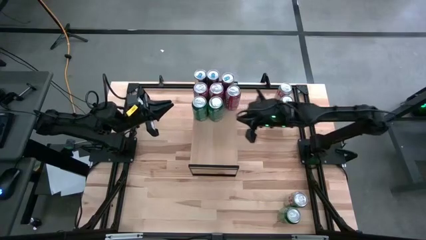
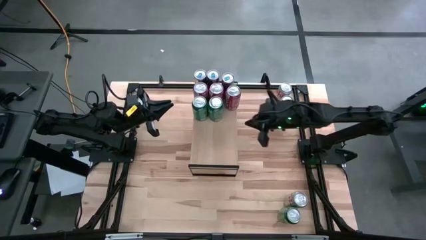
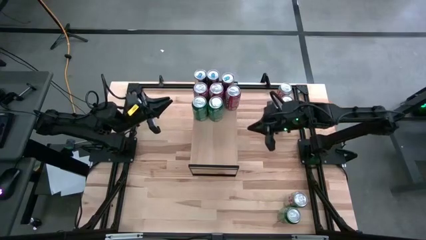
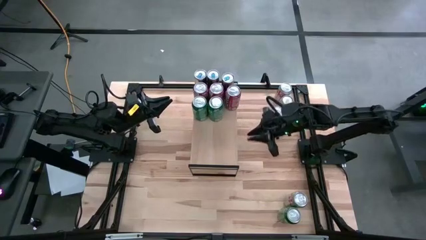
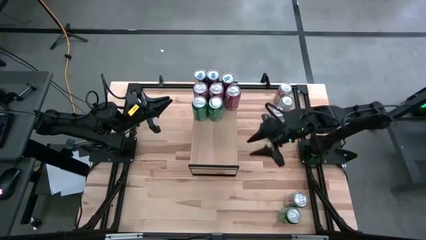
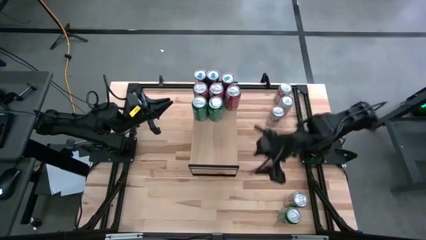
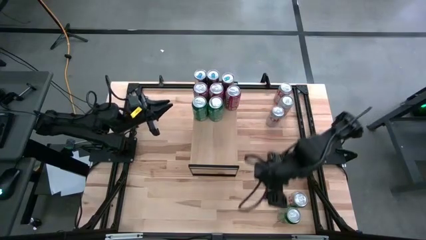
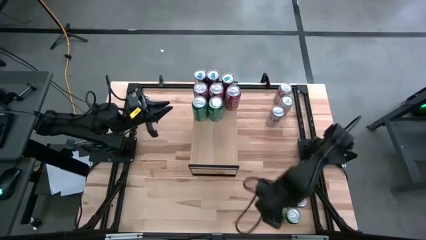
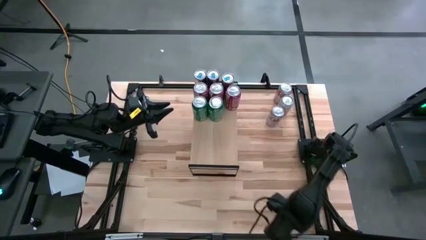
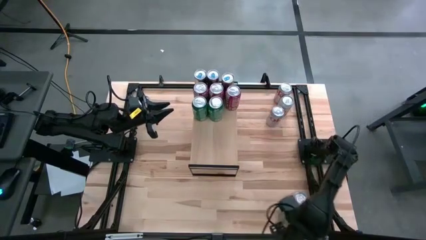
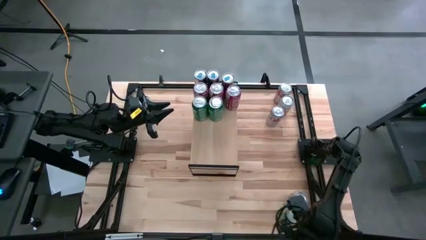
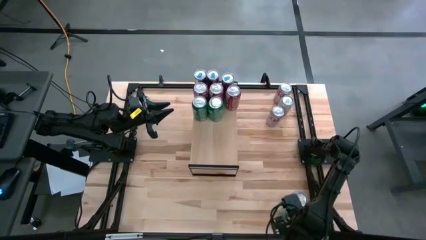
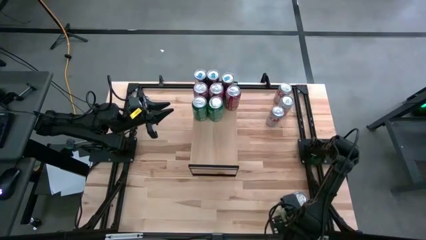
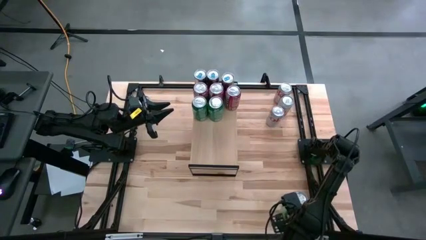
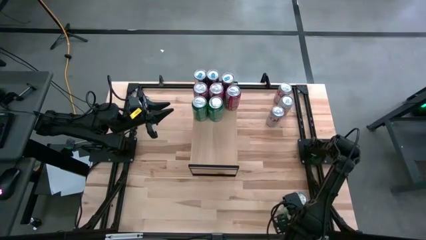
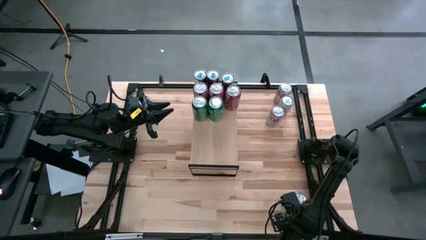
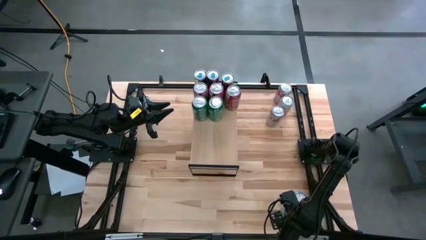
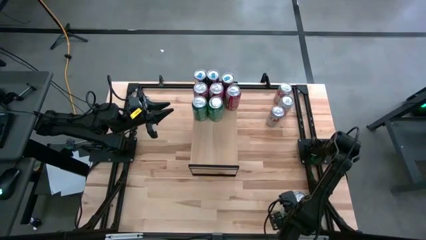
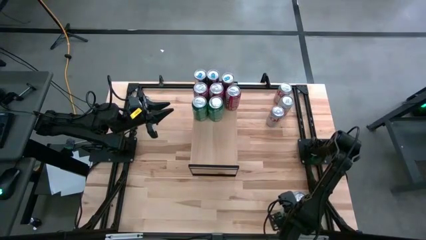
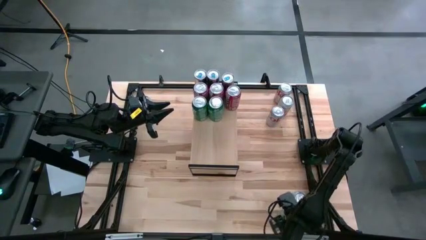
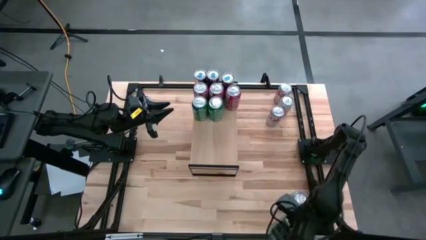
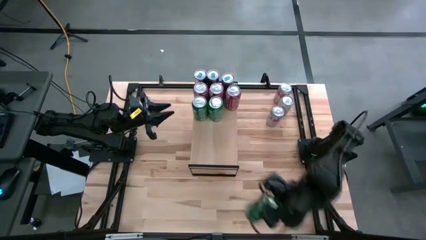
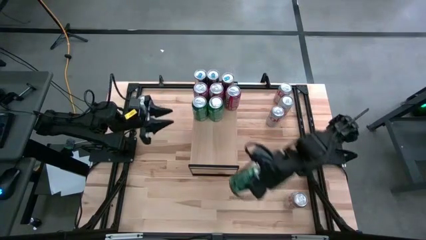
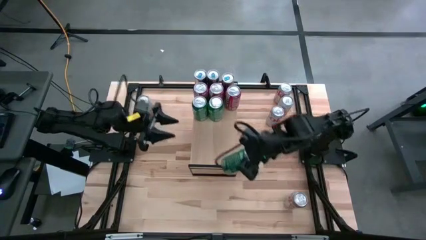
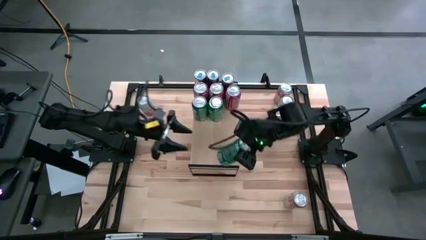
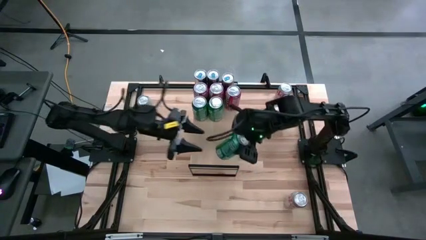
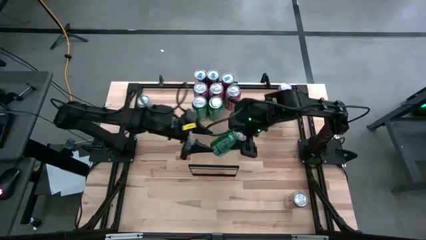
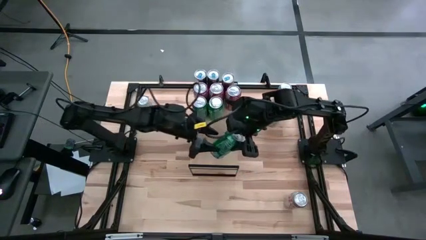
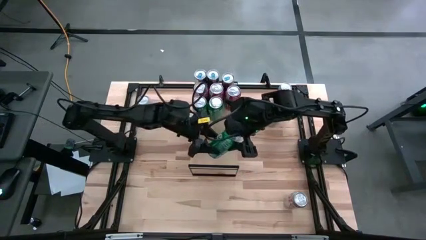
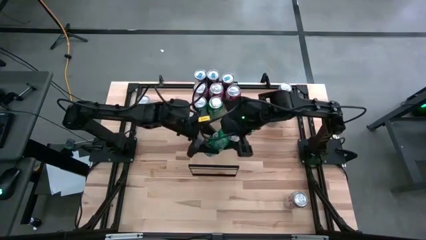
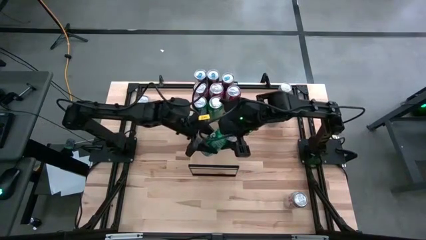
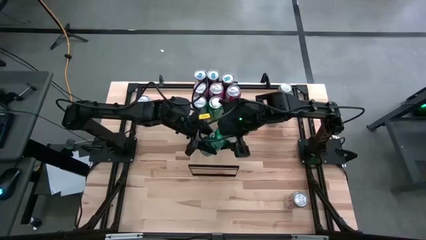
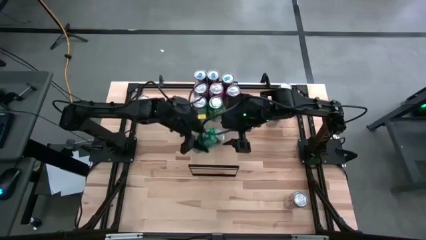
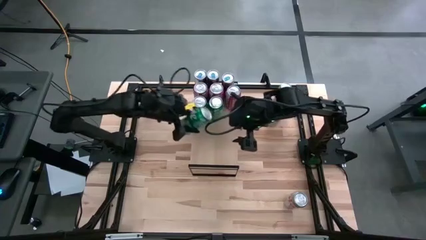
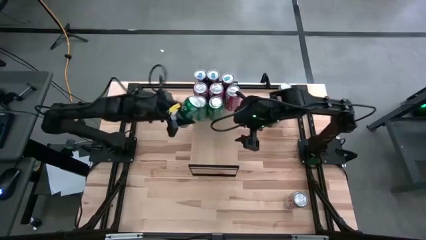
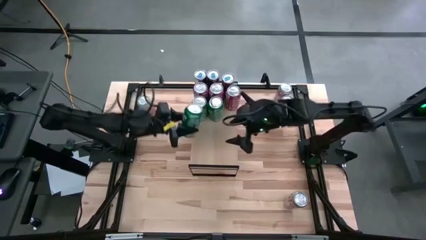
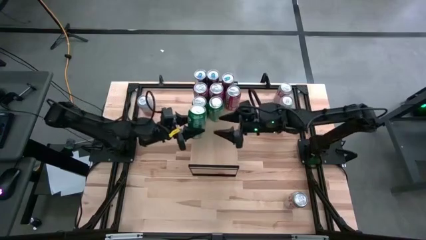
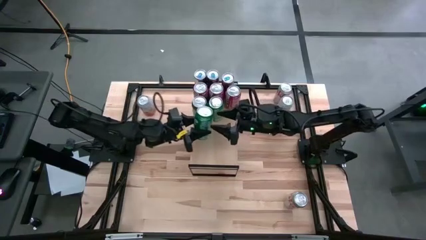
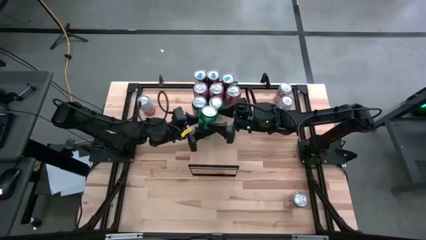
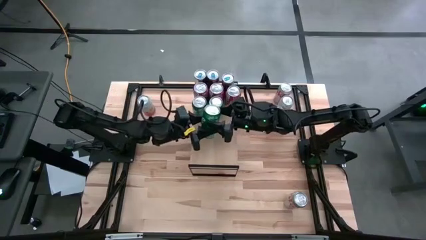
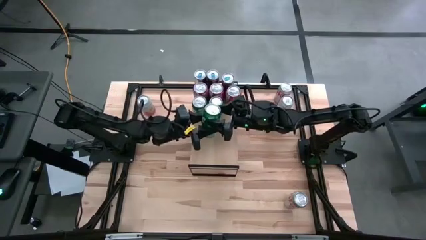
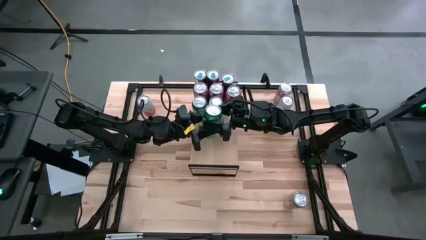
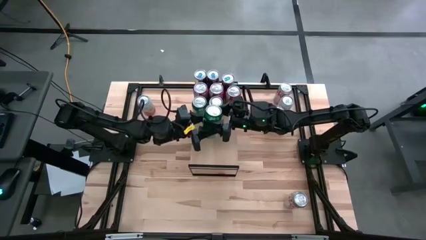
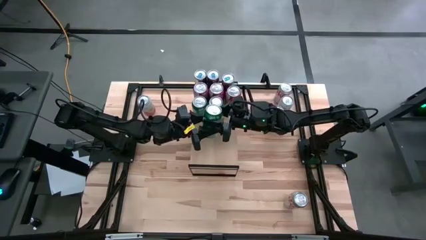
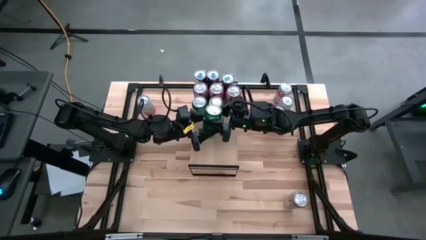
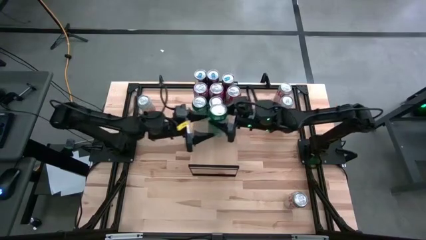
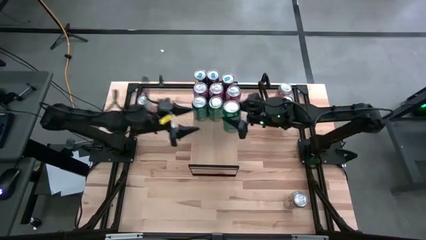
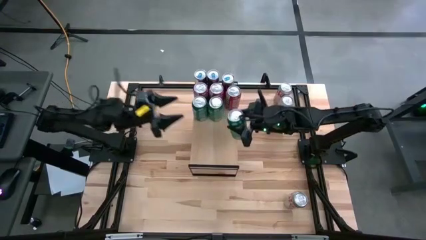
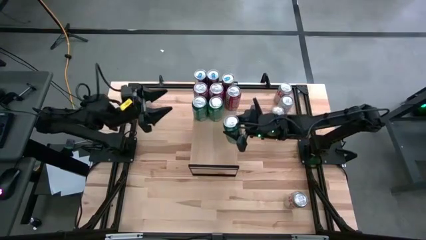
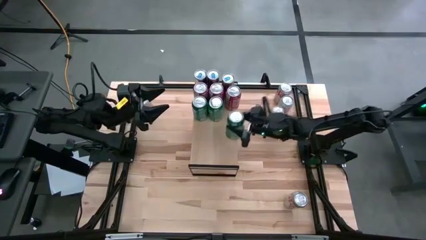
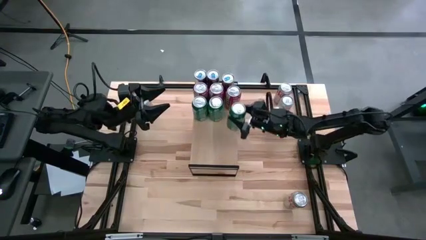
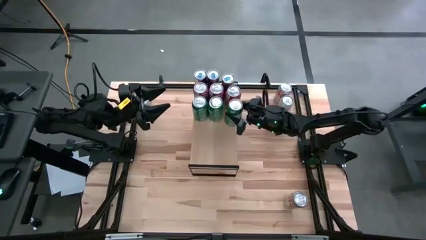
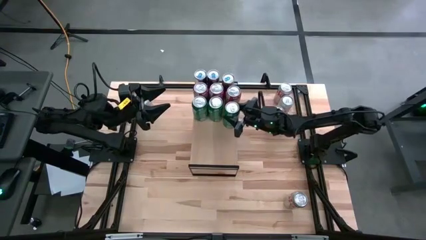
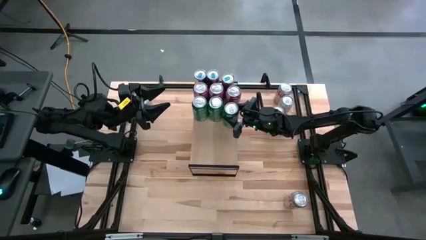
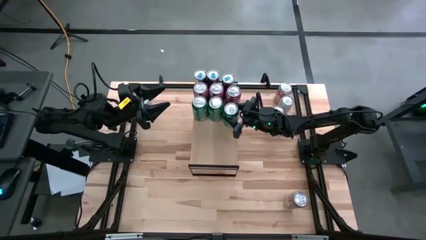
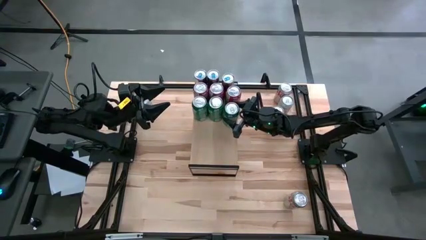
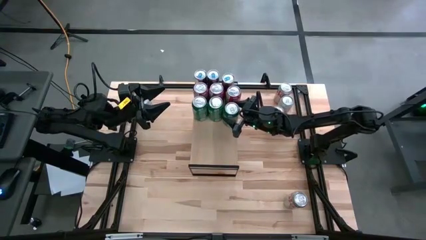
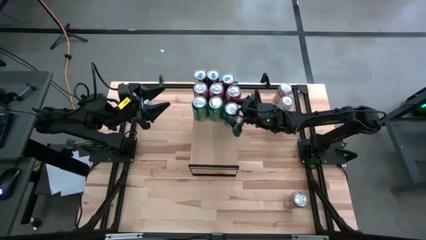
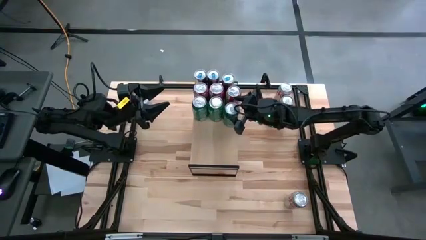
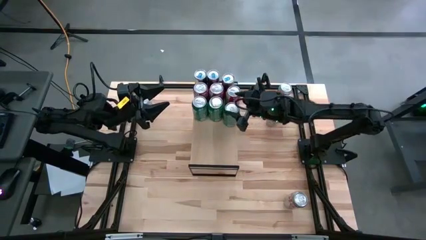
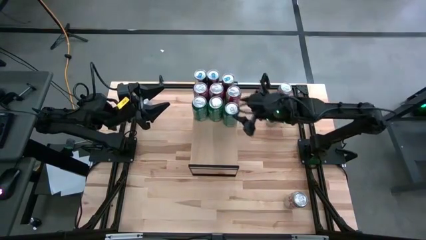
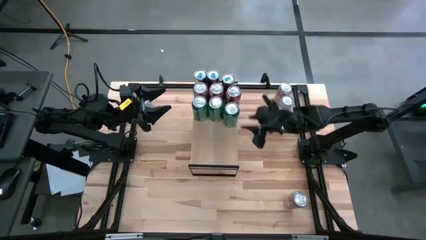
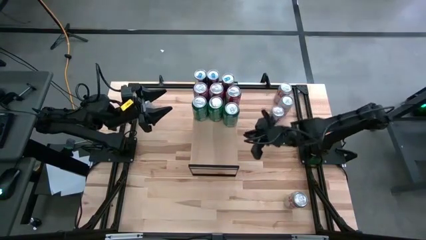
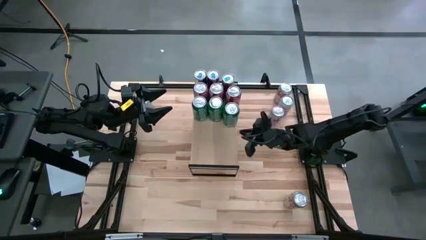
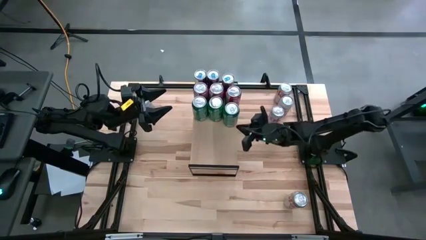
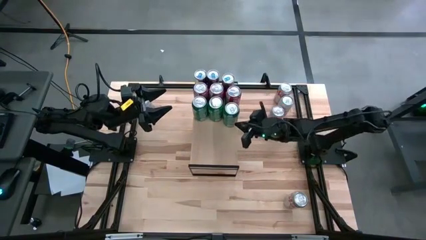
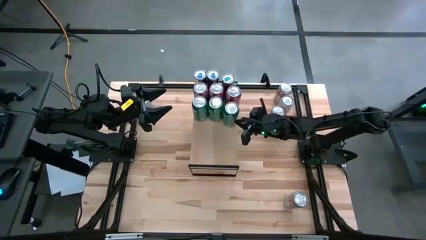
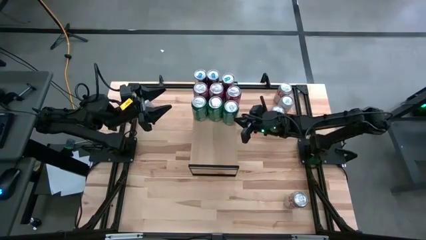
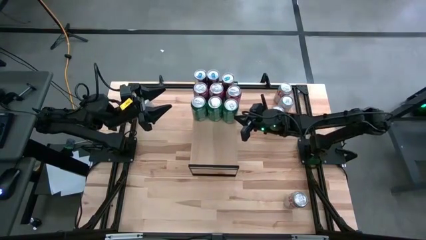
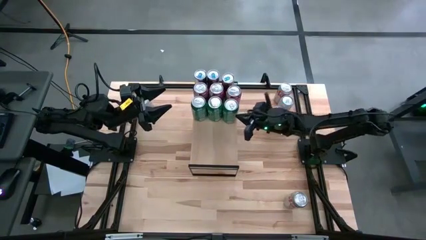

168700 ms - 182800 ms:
Task: Place canned beverage on shelf
Put the green soda can on the shelf

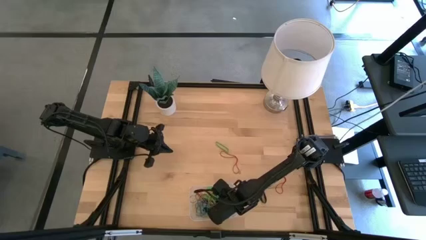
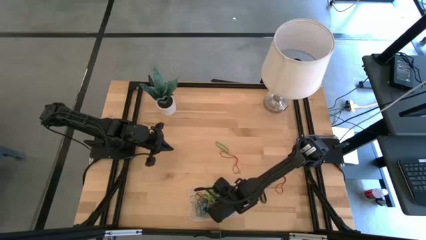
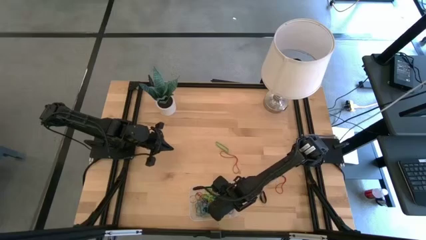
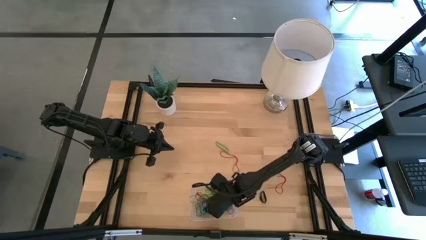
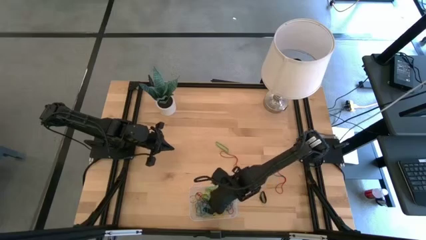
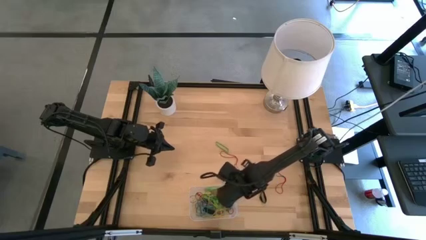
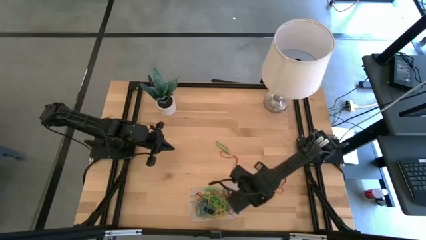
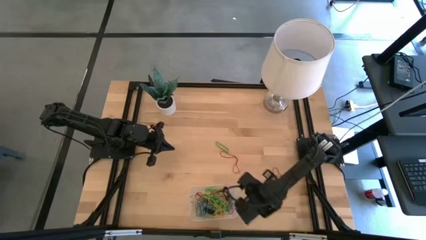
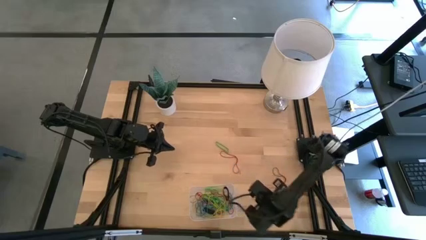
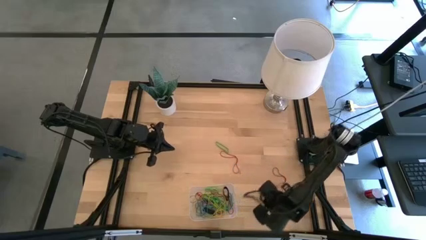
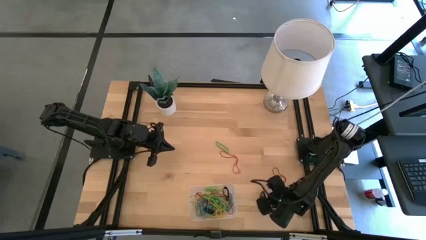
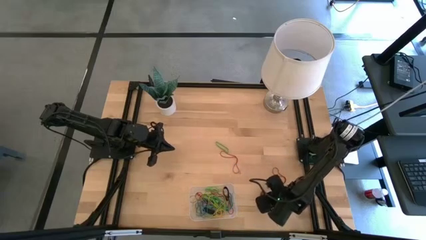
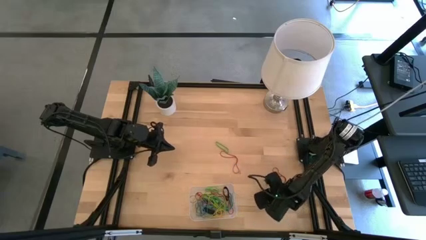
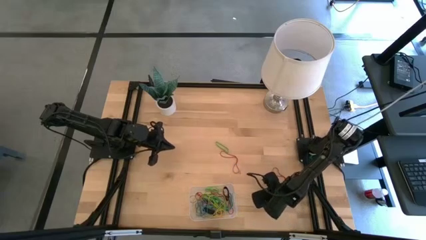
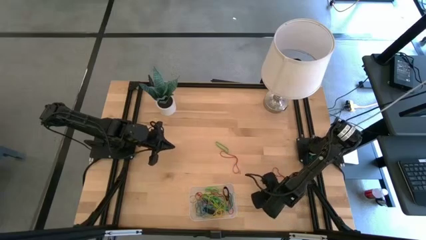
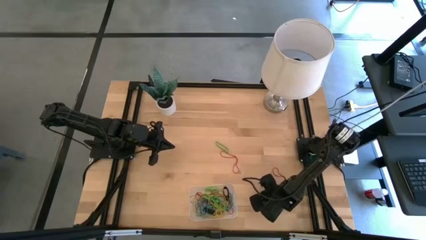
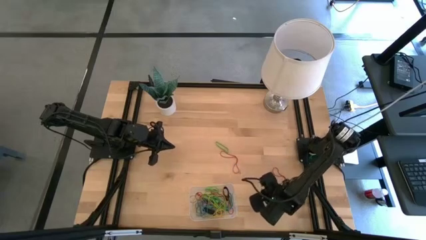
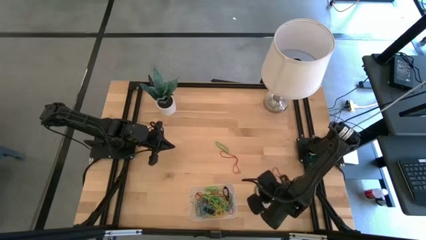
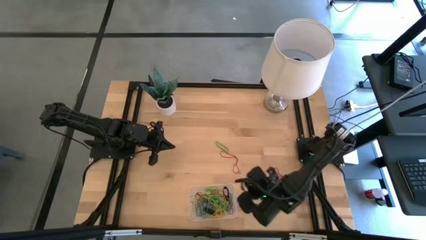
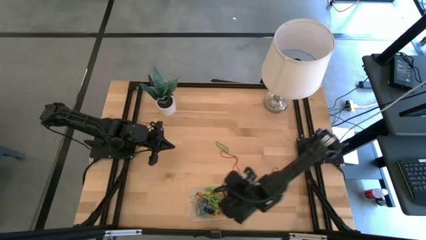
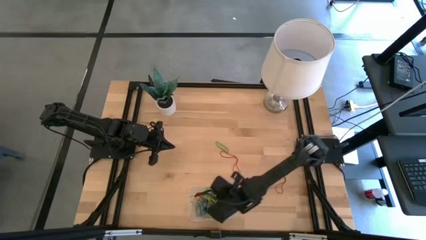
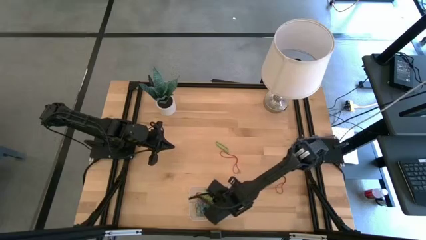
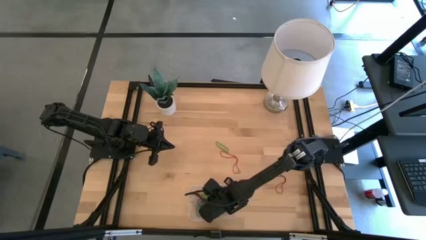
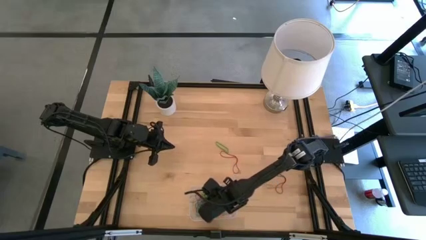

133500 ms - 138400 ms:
Task: Pick and place rubber bands into bin
Put the black rubber band into the transparent bin
